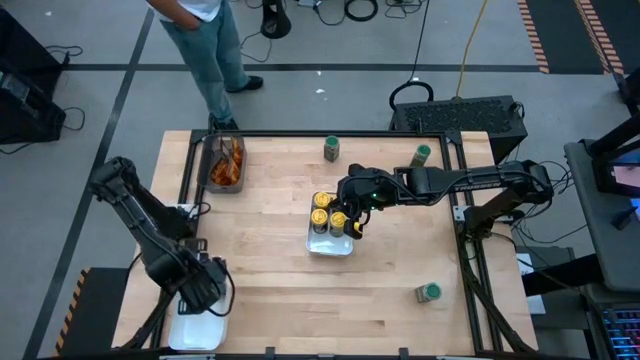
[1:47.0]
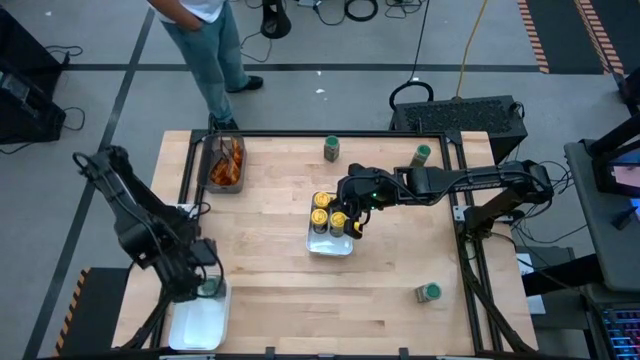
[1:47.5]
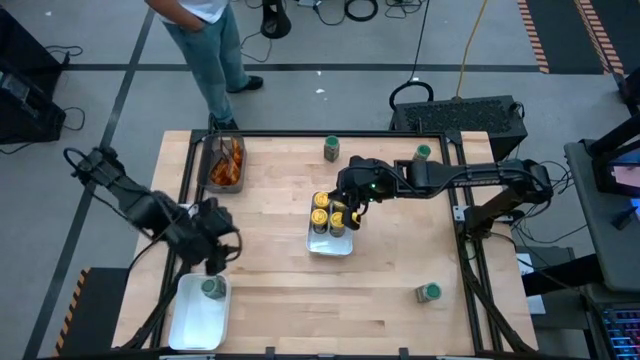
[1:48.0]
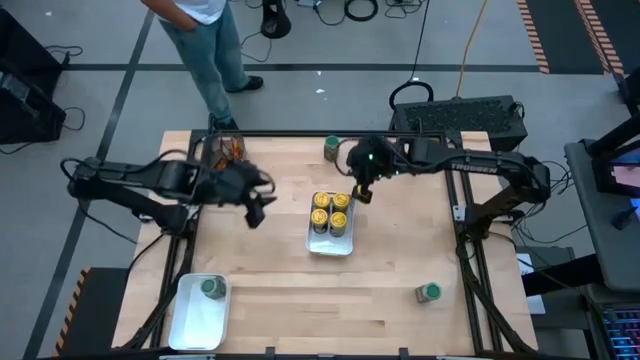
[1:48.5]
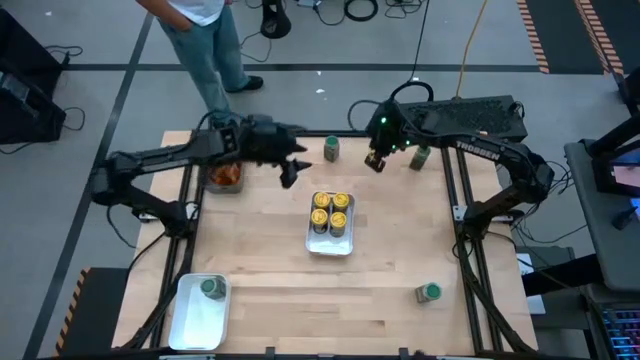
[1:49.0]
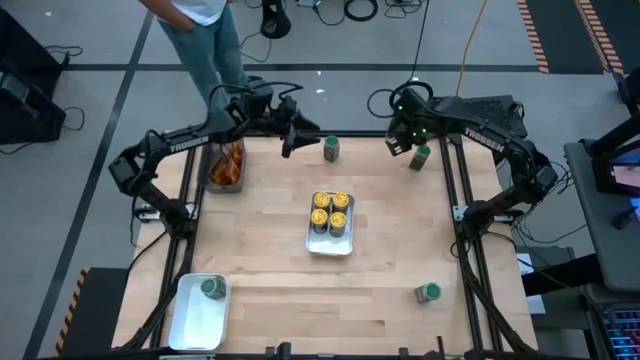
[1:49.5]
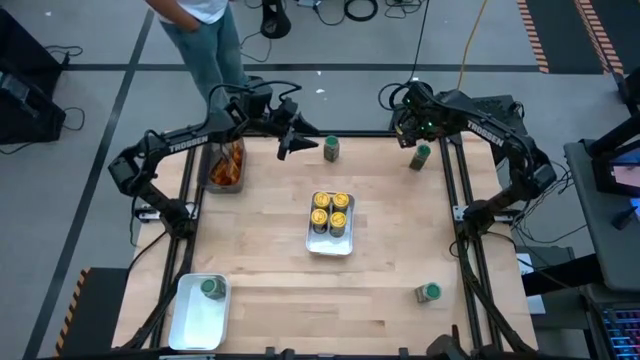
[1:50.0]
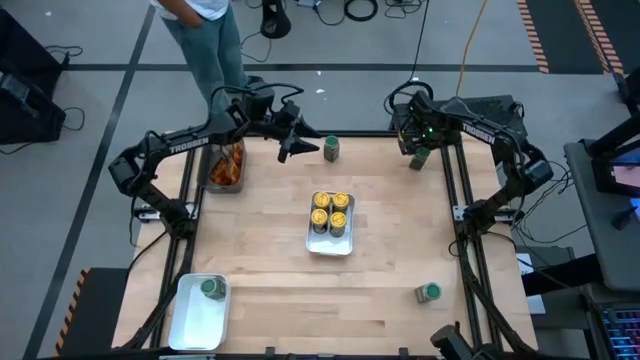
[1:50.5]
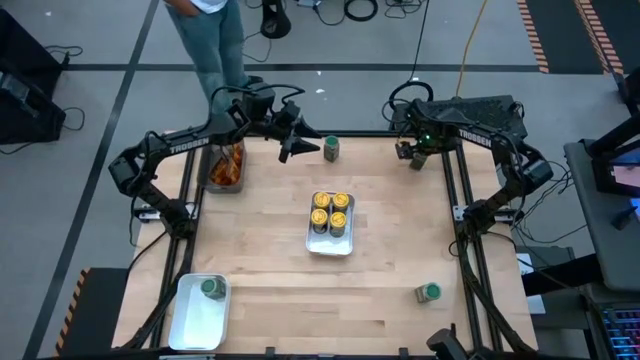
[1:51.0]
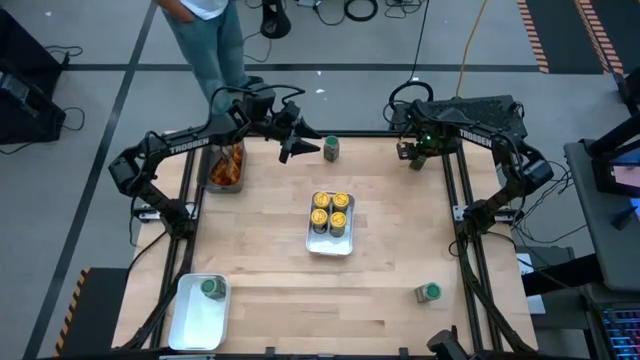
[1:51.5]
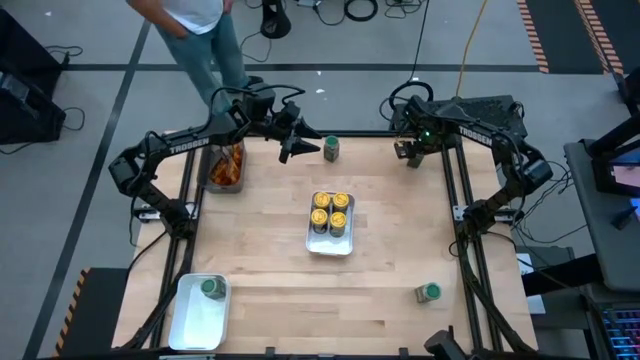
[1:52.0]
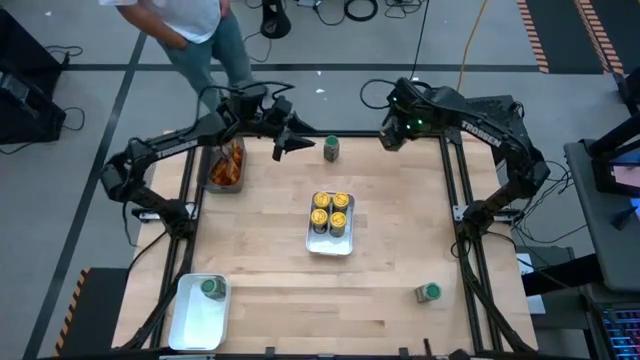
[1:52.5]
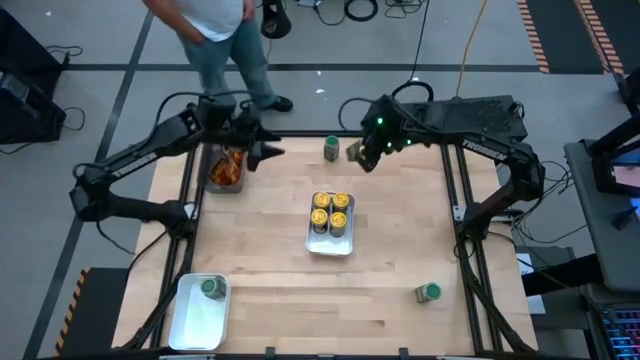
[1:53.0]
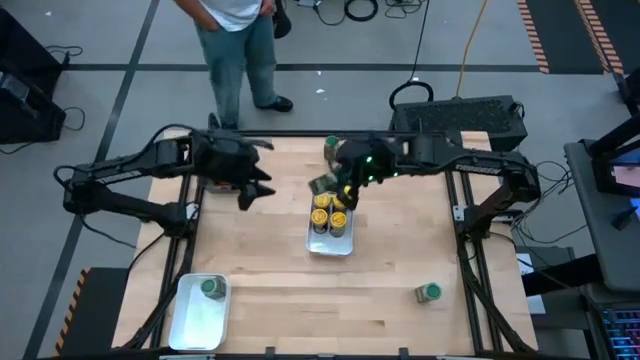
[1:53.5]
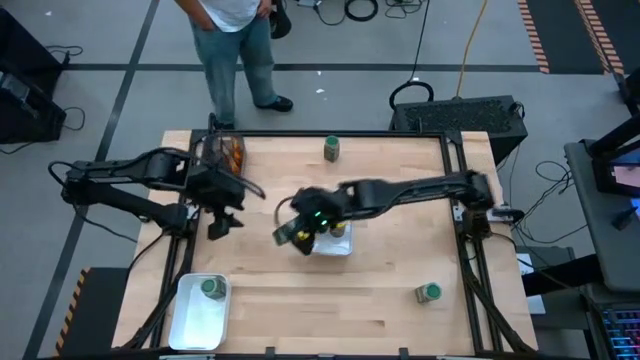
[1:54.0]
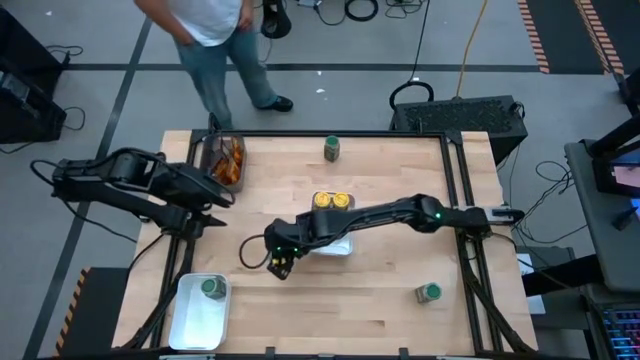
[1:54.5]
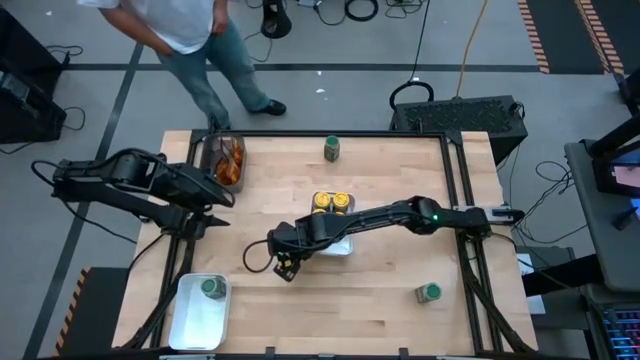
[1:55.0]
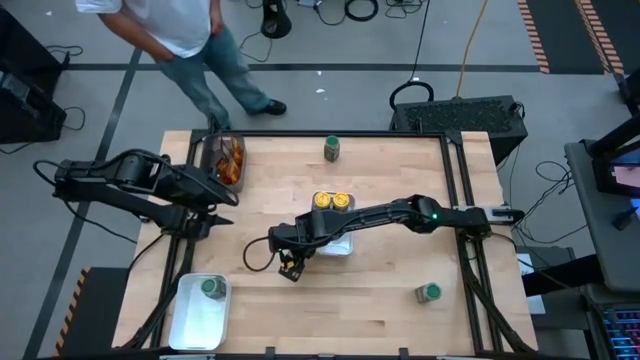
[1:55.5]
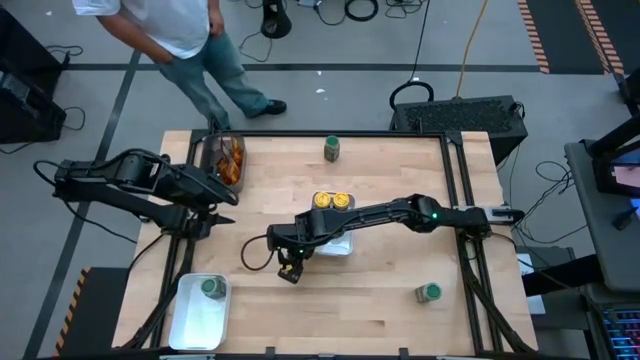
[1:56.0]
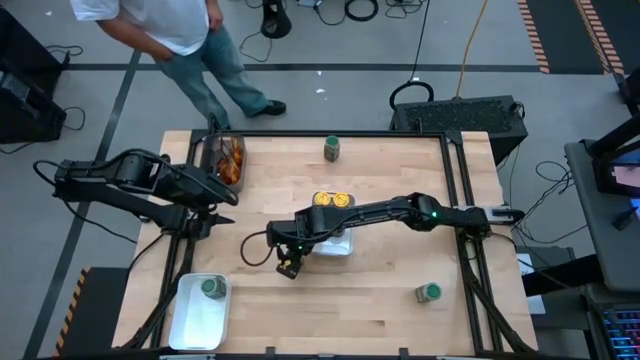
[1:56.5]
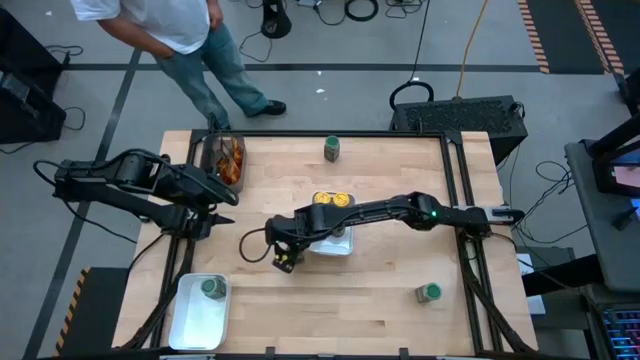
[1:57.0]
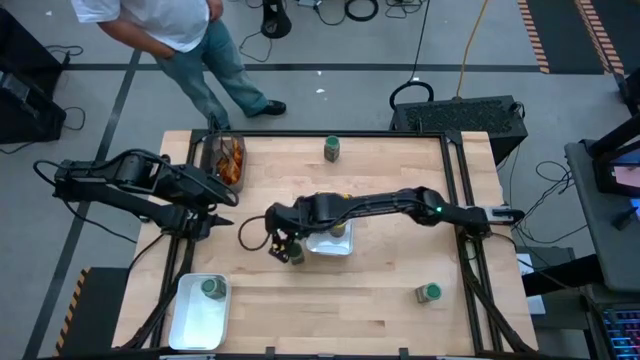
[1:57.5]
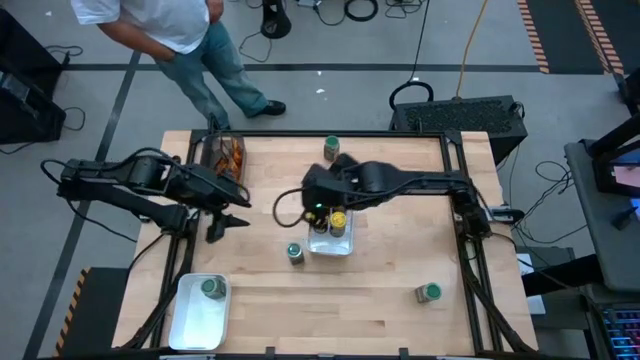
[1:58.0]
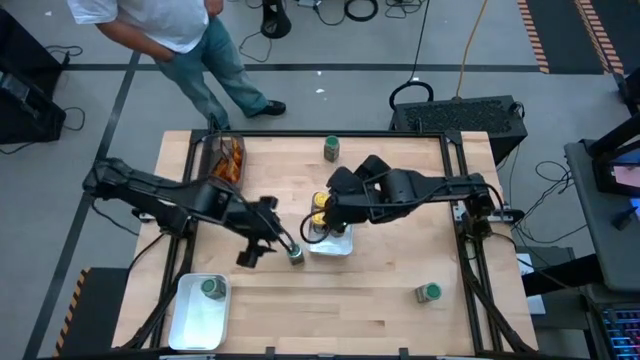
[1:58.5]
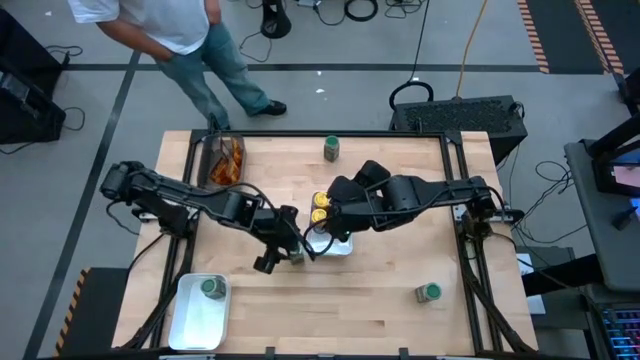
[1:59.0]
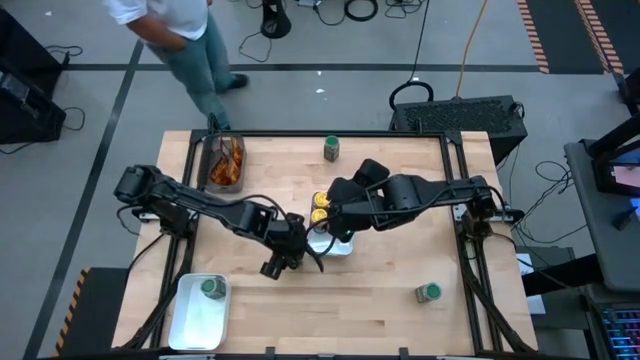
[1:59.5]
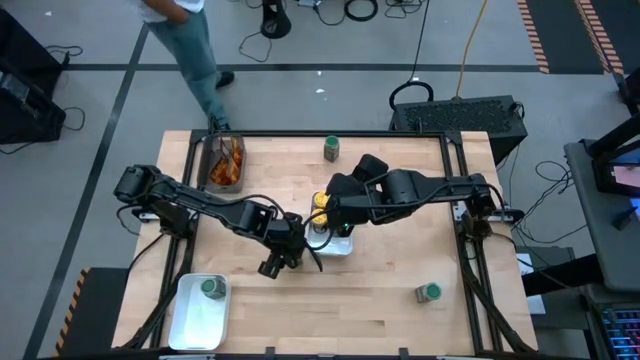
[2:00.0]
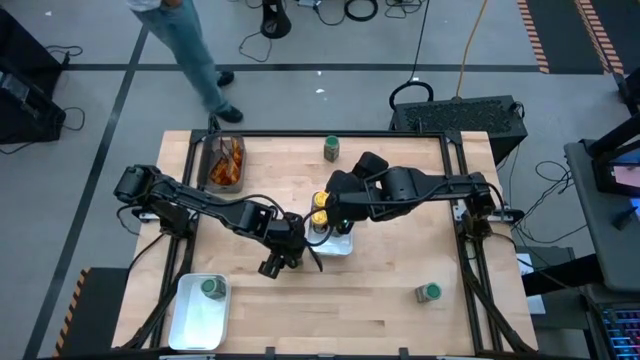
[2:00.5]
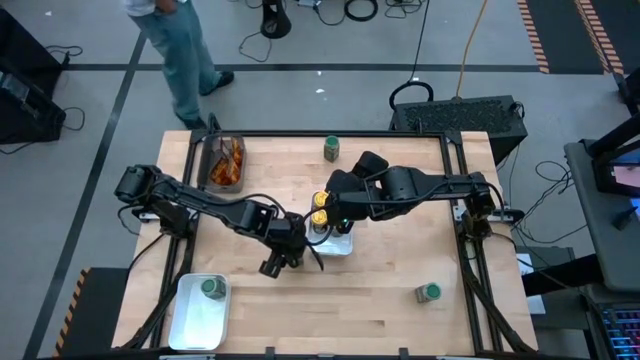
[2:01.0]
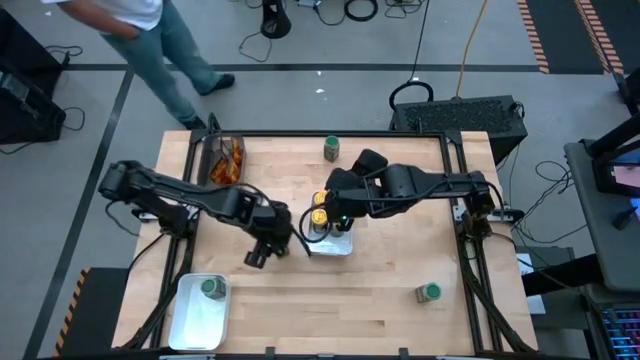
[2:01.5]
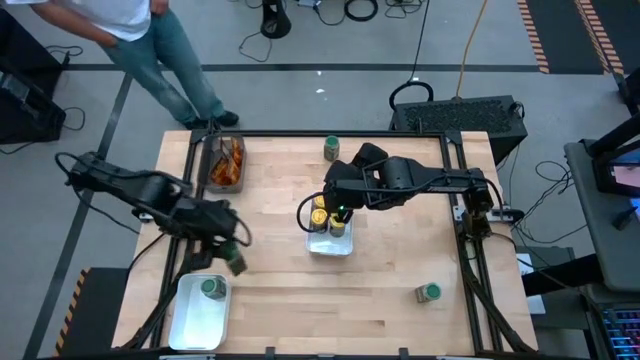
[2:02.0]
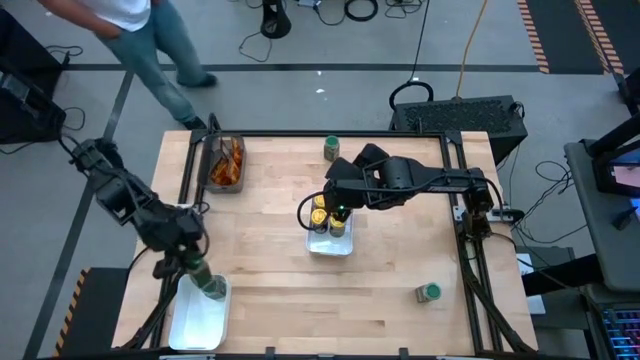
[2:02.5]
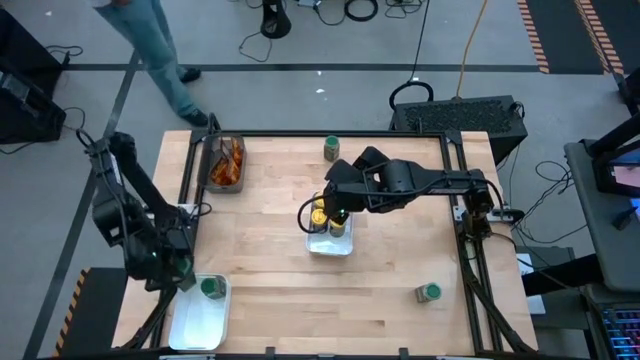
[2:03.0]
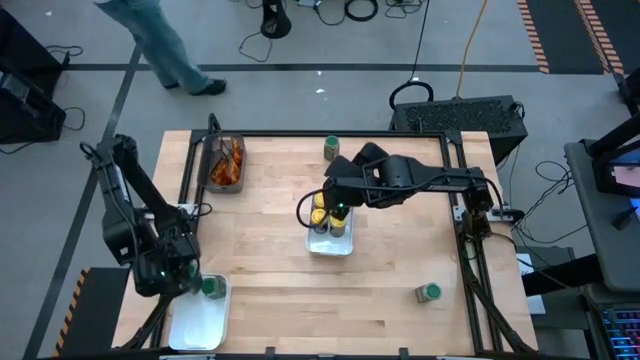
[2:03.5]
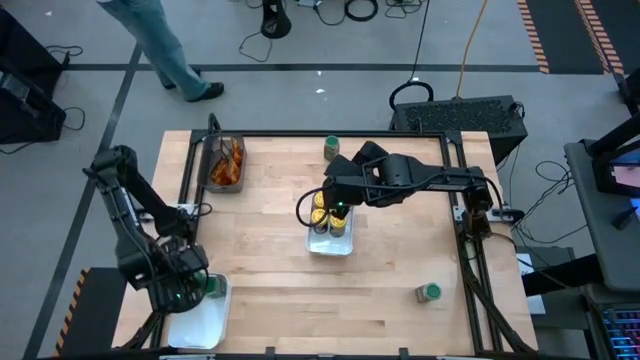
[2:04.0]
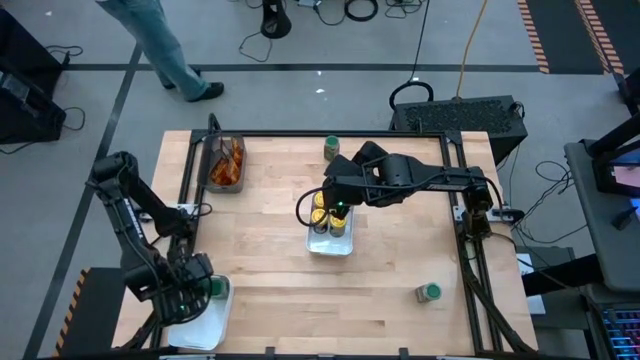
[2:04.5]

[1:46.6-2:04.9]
Task: Sort spices by type
Put the middle green spice bottle into the bottom white bin
